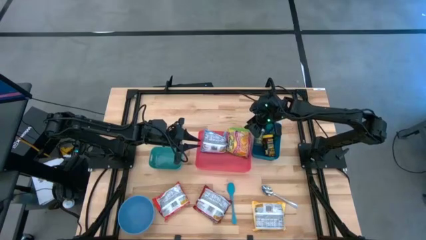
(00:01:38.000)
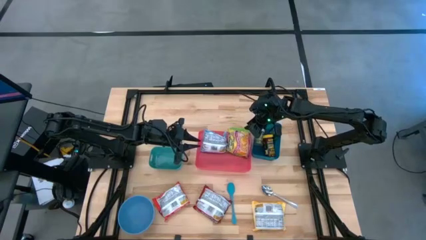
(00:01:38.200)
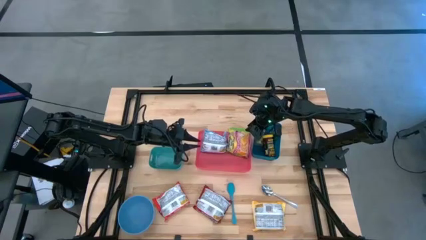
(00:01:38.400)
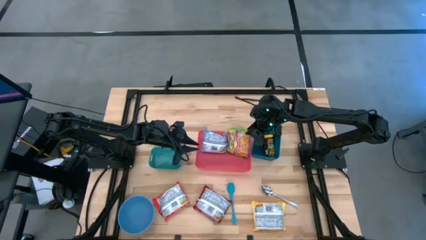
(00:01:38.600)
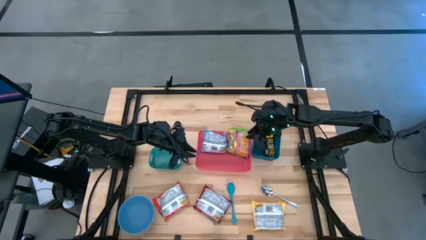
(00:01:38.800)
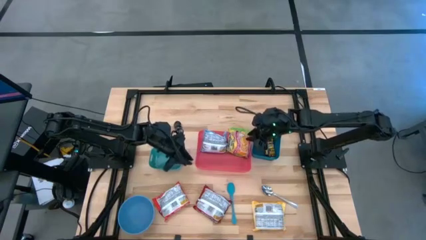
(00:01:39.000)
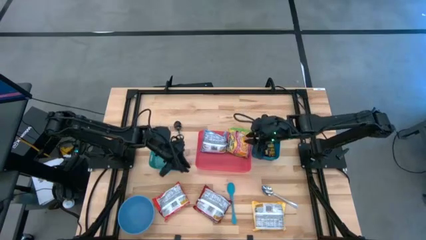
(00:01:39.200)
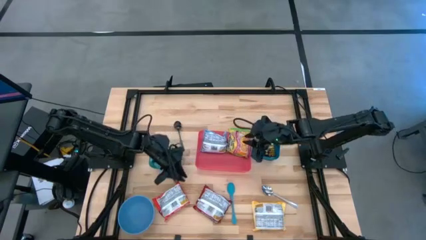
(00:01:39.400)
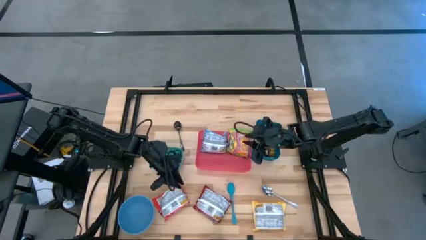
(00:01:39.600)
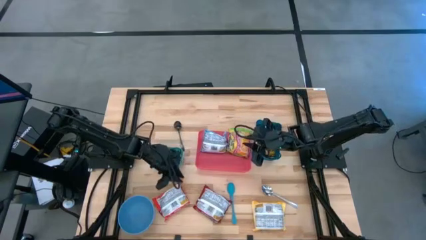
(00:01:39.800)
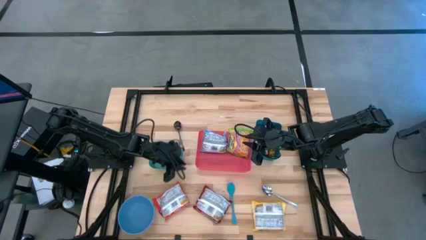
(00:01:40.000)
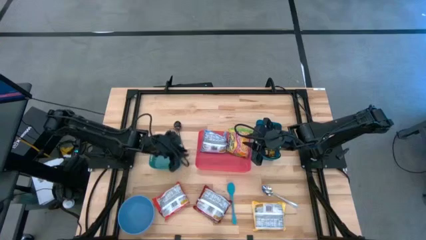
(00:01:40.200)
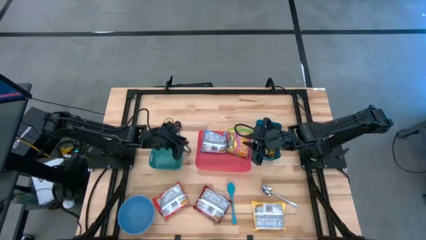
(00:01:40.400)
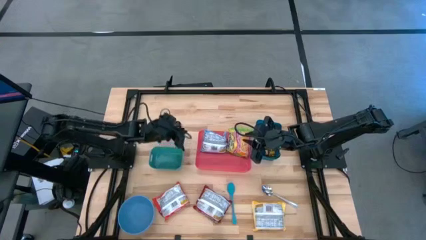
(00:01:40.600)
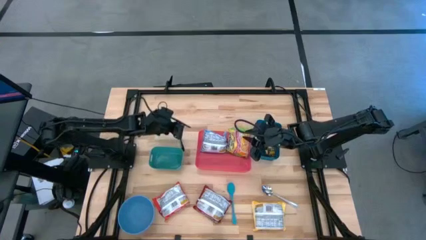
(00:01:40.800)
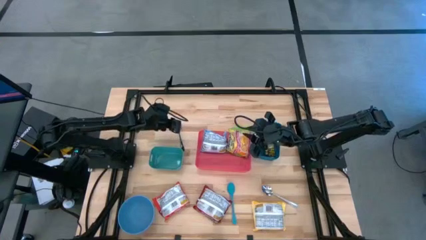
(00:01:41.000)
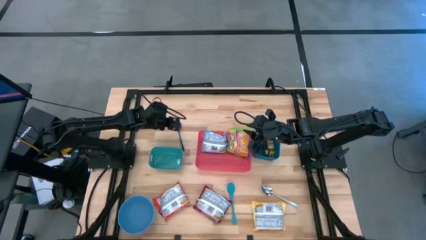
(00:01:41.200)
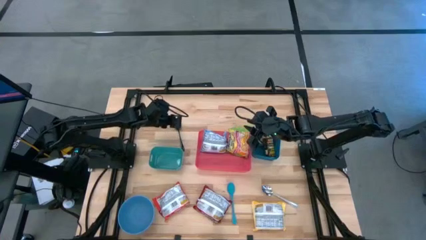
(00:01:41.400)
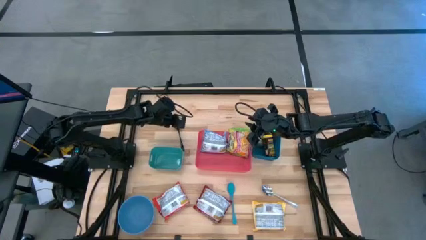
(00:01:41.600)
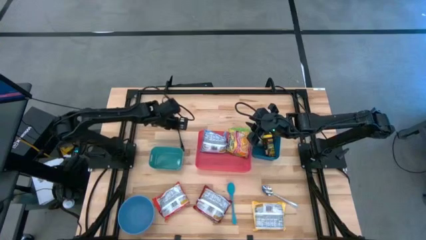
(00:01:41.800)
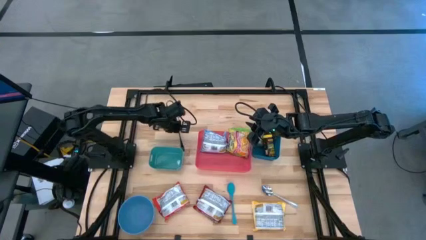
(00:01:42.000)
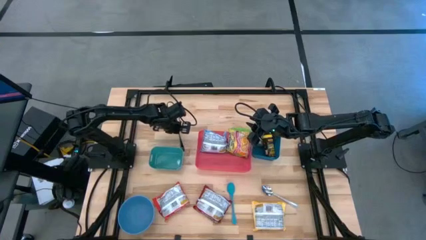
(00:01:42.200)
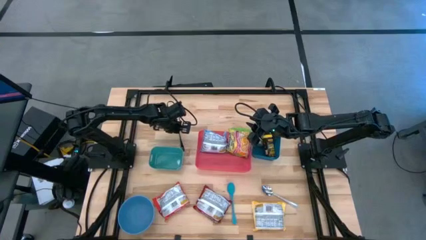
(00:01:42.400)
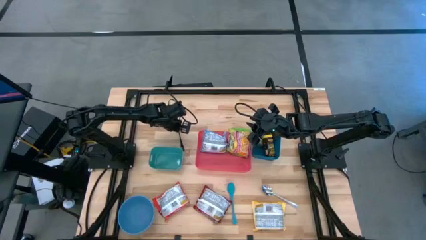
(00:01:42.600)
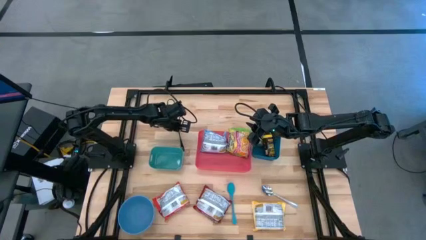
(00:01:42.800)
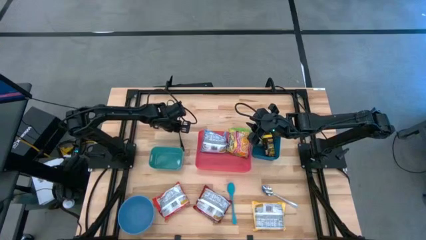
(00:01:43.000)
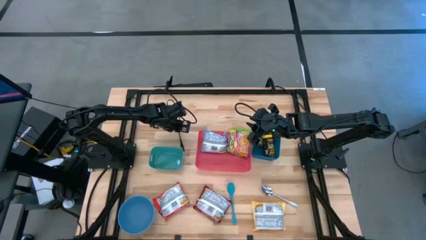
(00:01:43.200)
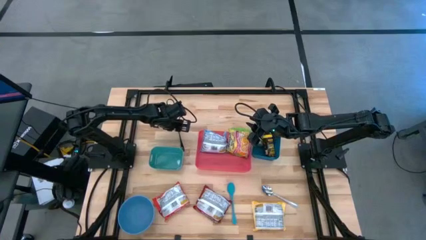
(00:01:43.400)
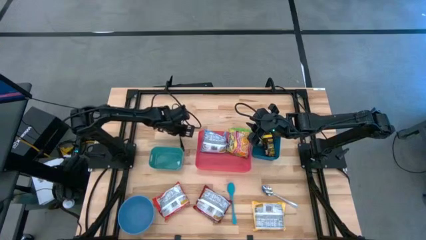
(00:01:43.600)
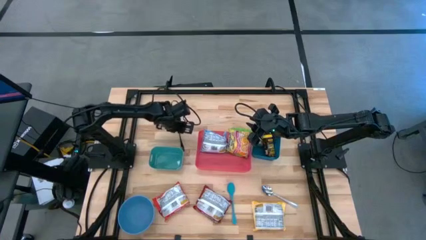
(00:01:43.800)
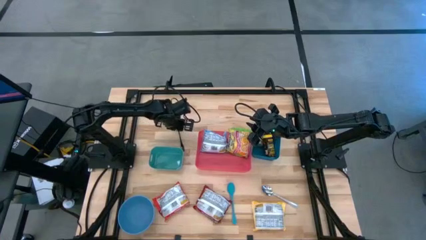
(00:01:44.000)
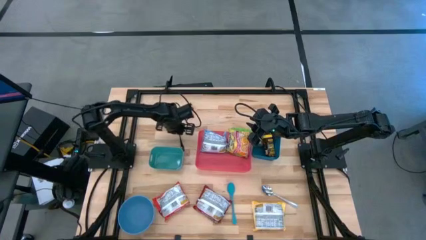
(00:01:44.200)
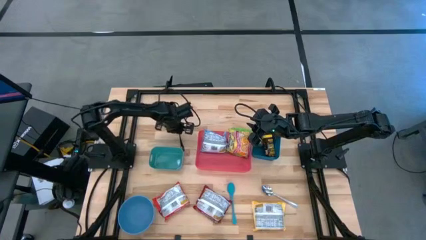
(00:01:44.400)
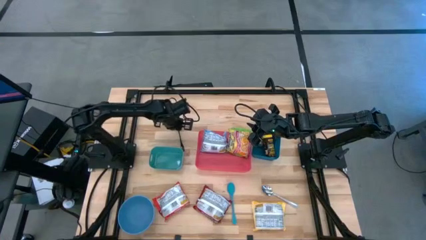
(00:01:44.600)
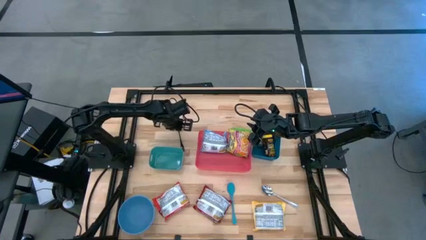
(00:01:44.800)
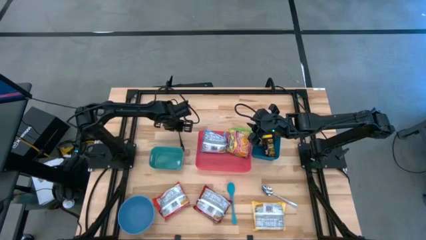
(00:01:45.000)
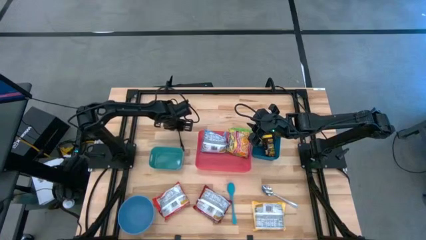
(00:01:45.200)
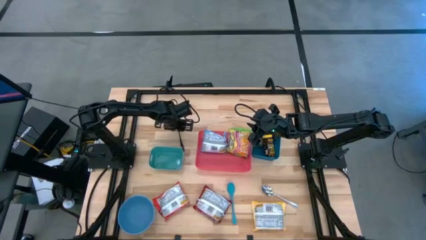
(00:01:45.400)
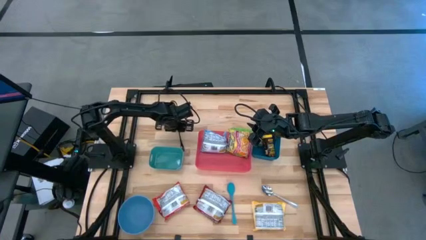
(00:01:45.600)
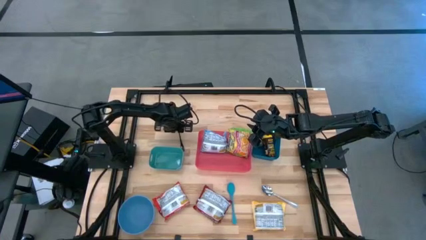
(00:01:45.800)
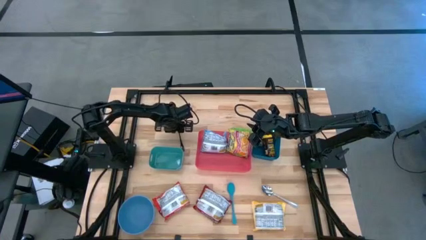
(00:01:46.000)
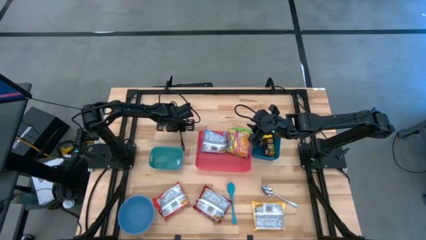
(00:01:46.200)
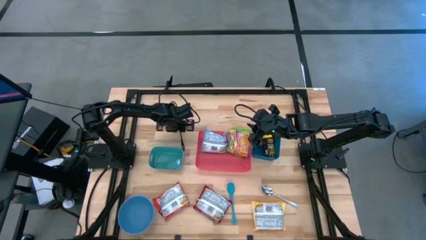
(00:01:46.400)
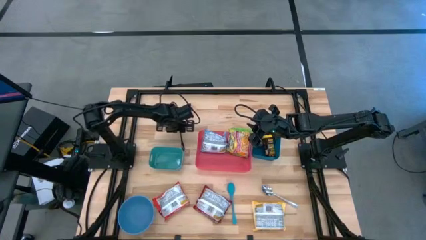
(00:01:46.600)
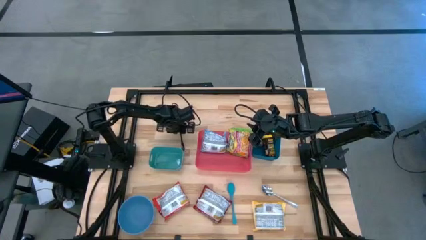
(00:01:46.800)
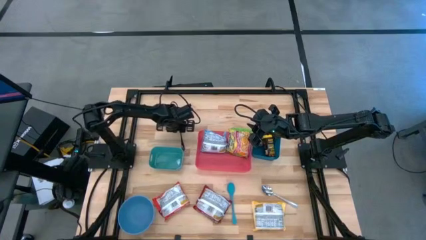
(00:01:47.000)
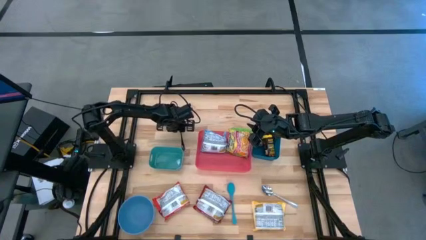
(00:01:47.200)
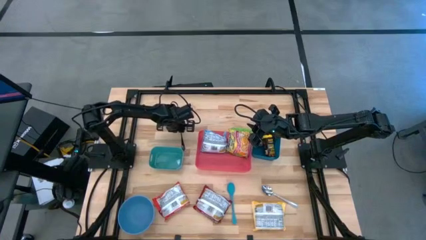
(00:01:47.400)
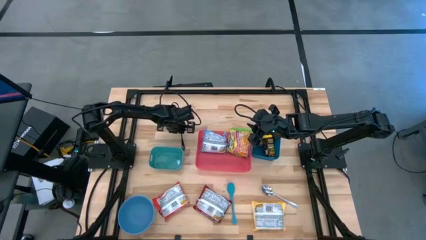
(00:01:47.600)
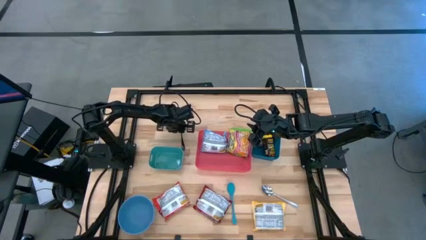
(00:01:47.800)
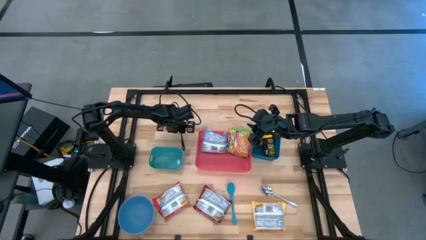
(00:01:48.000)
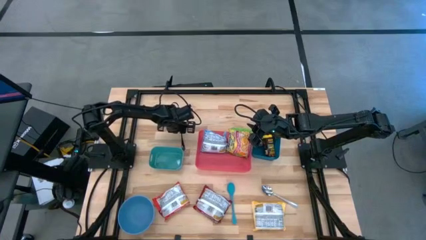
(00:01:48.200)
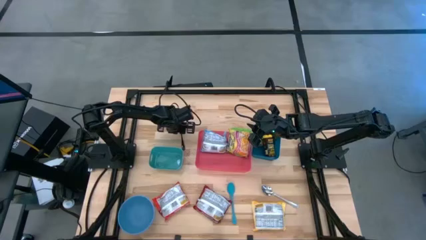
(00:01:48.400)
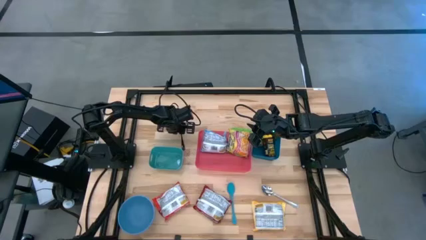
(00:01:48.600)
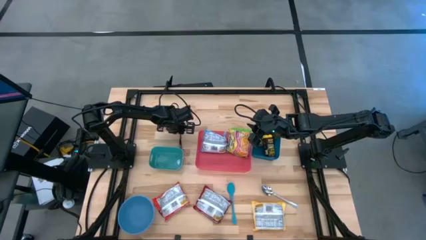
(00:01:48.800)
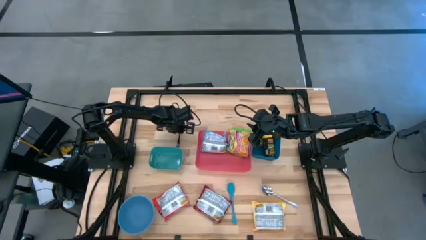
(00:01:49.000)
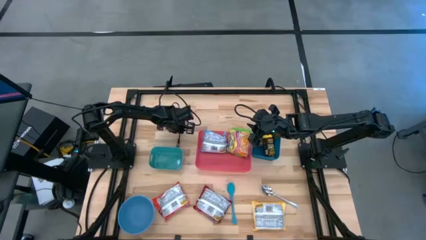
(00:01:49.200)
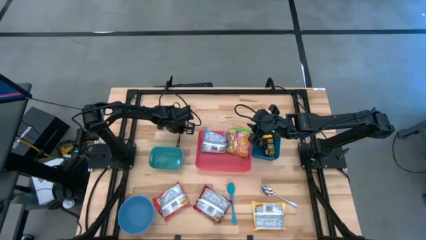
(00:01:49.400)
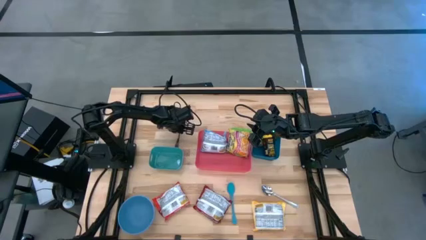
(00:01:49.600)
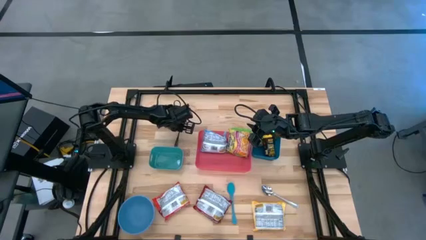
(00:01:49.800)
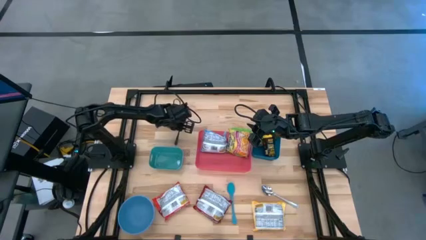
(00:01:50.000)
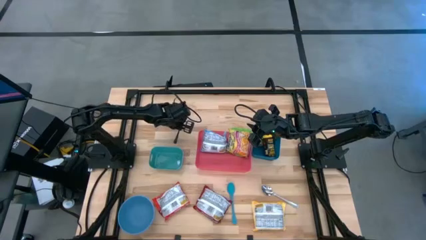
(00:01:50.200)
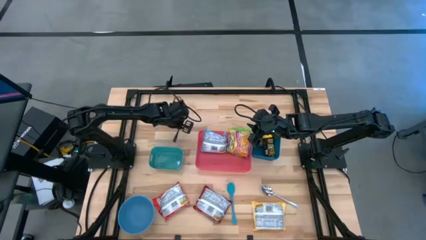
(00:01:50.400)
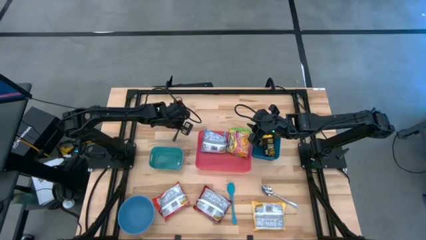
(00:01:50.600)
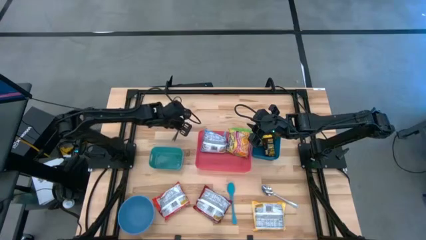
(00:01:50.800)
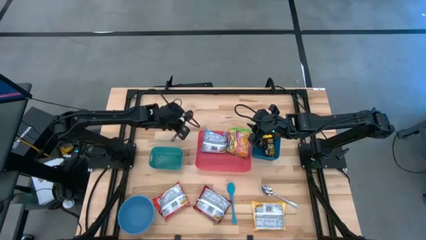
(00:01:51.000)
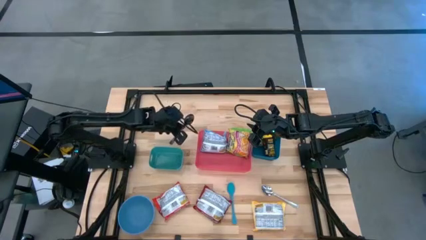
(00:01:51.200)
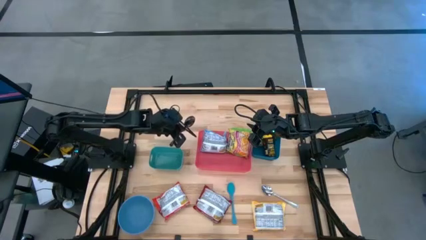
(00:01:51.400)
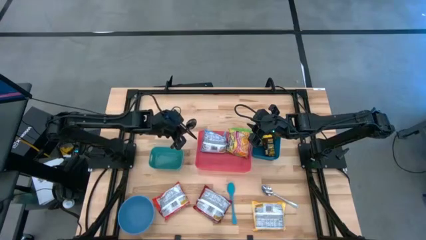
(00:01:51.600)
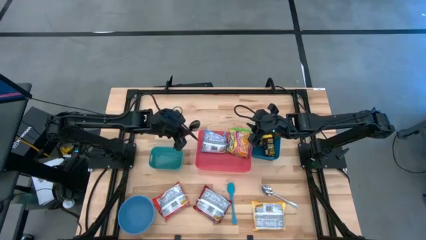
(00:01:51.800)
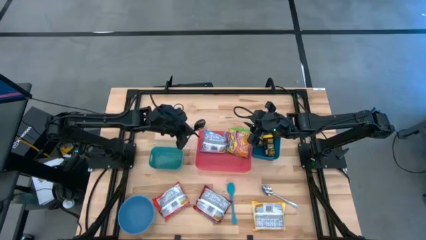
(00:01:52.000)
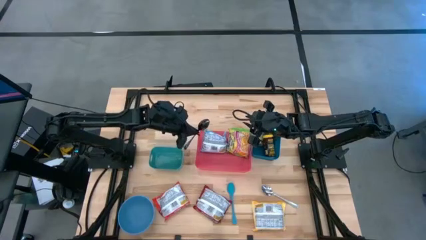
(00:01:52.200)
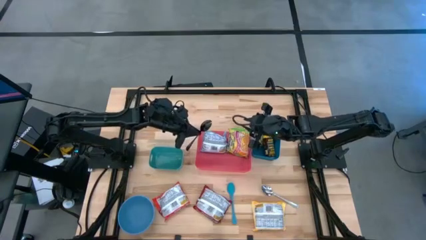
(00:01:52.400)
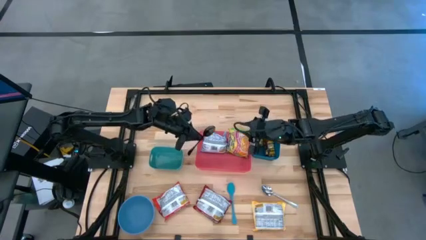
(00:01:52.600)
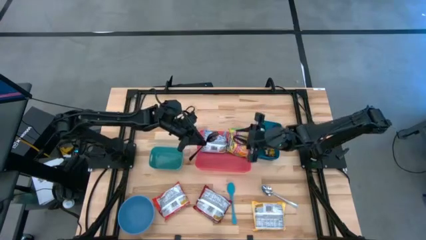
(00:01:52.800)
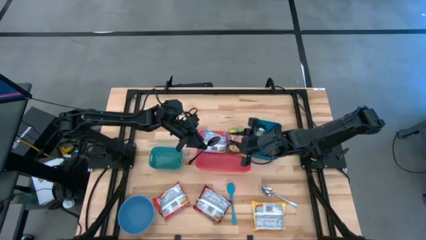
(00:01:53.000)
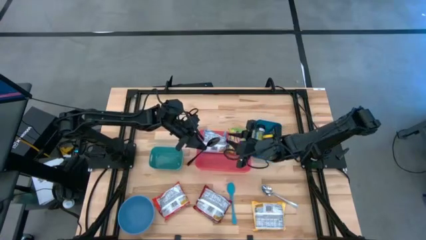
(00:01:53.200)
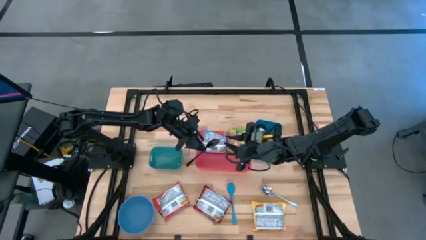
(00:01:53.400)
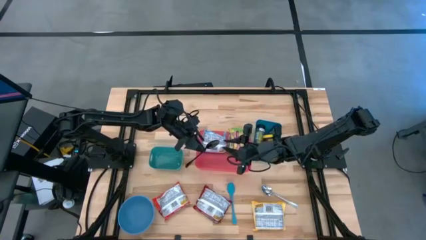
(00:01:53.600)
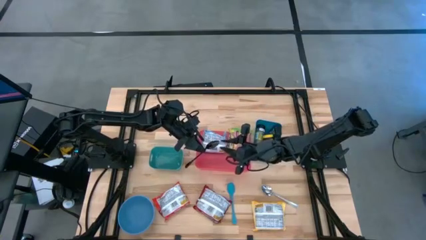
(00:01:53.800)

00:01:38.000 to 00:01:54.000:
Task: Pick & Place Food Item
Put the black spoon into the green bin
